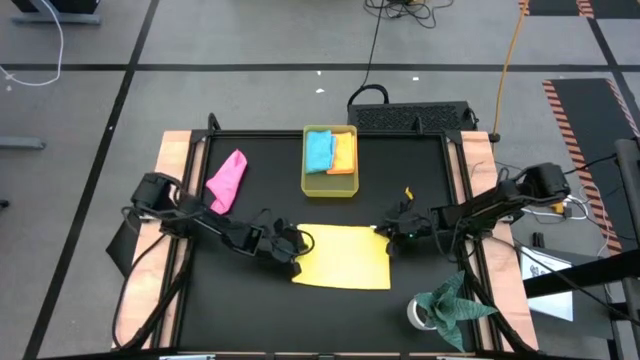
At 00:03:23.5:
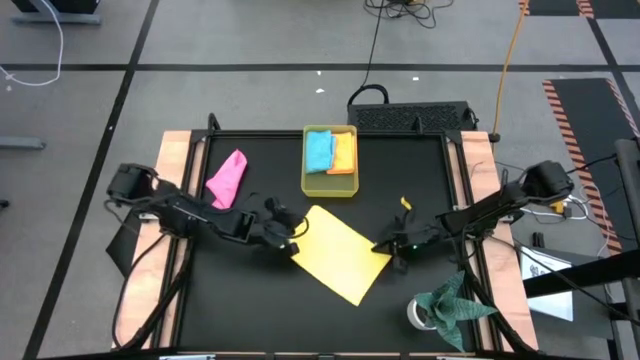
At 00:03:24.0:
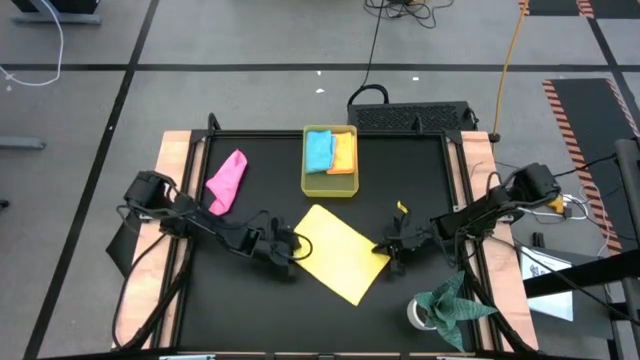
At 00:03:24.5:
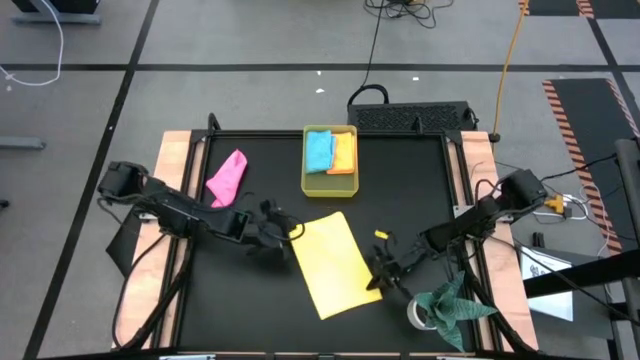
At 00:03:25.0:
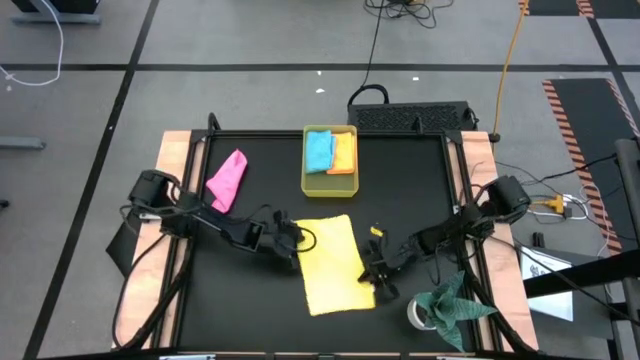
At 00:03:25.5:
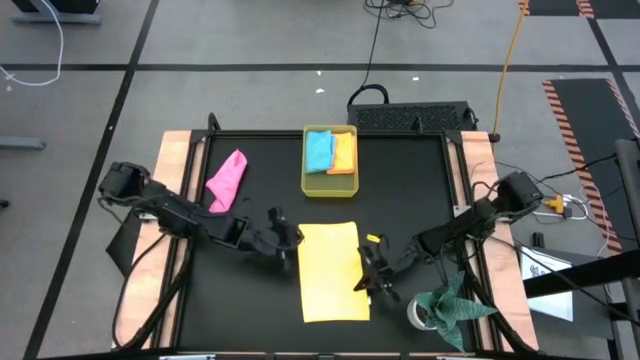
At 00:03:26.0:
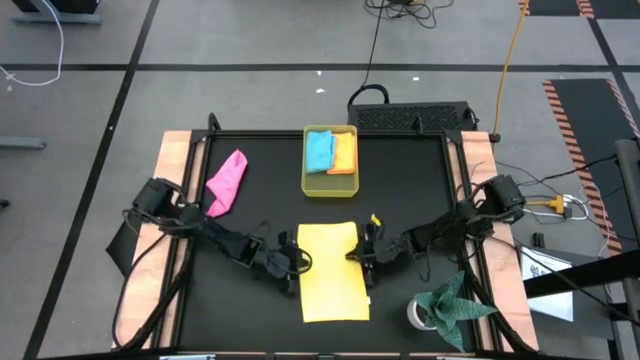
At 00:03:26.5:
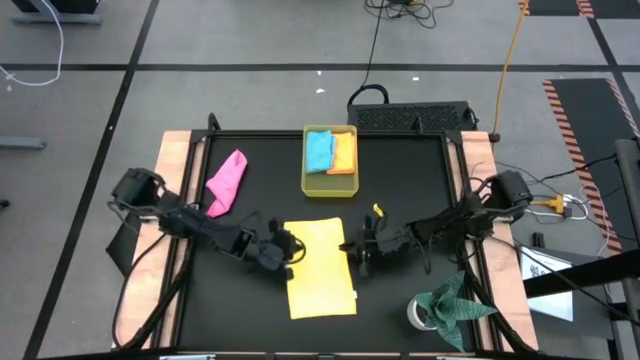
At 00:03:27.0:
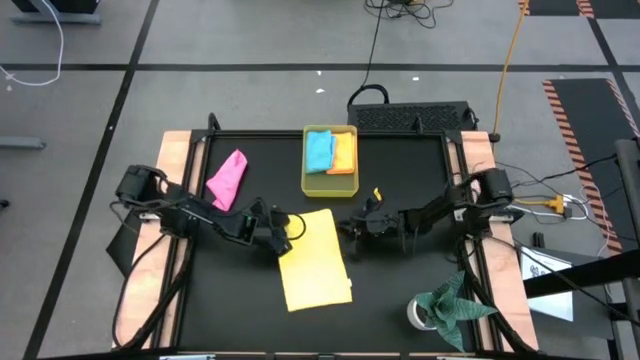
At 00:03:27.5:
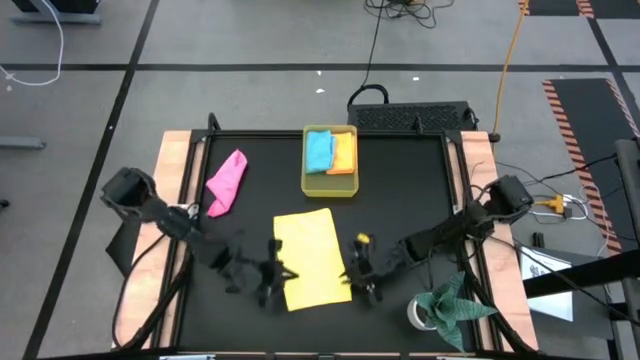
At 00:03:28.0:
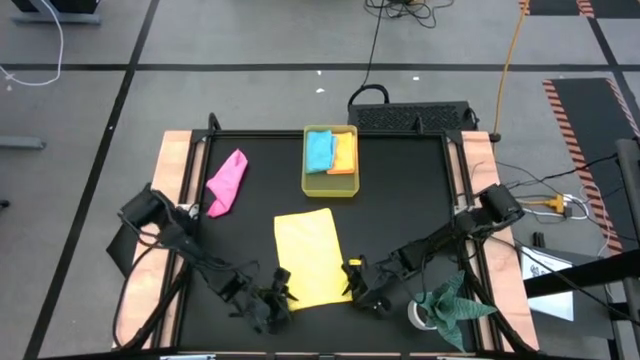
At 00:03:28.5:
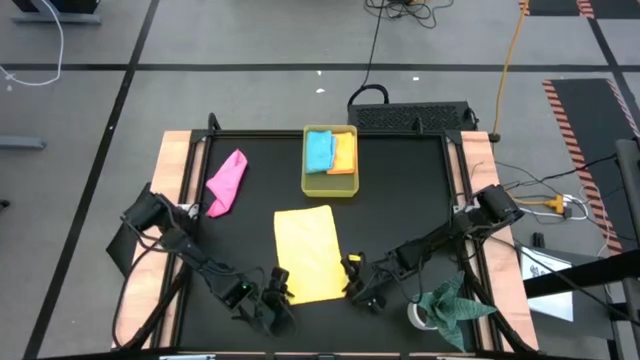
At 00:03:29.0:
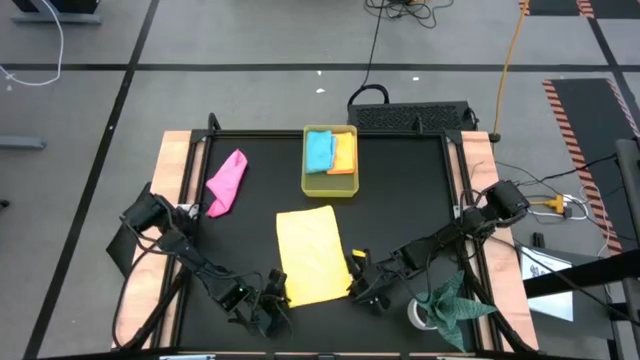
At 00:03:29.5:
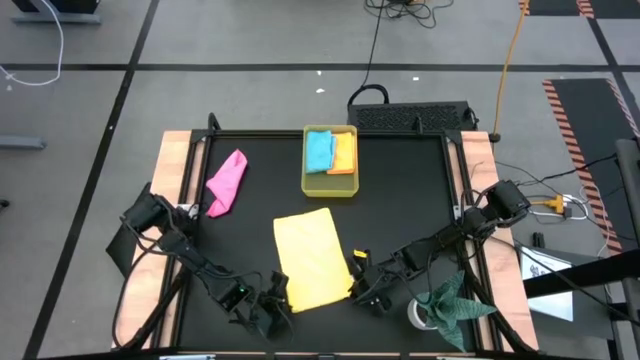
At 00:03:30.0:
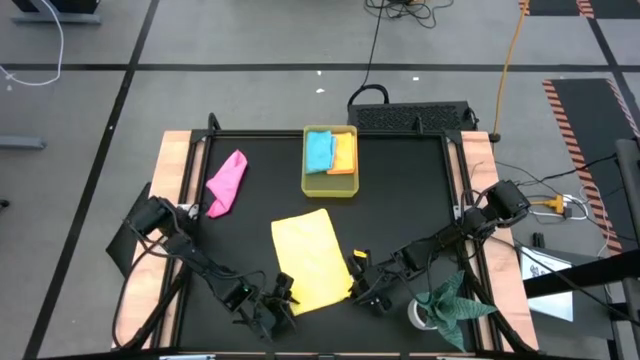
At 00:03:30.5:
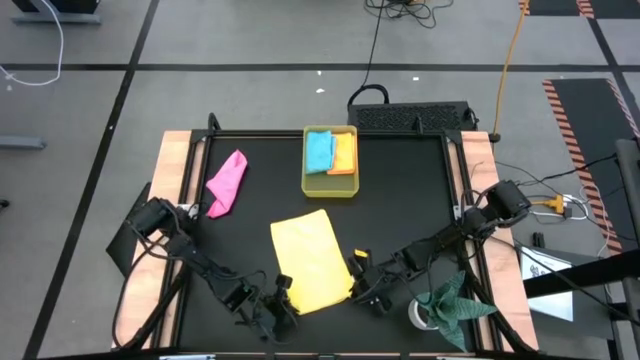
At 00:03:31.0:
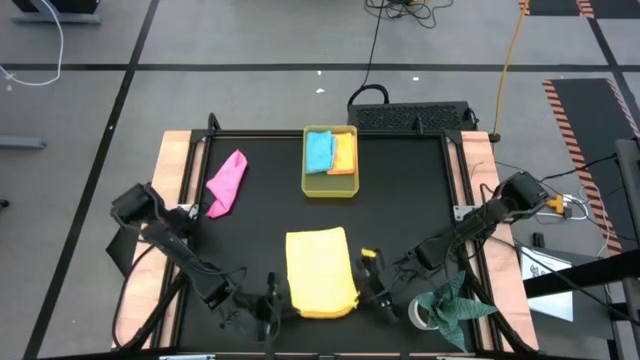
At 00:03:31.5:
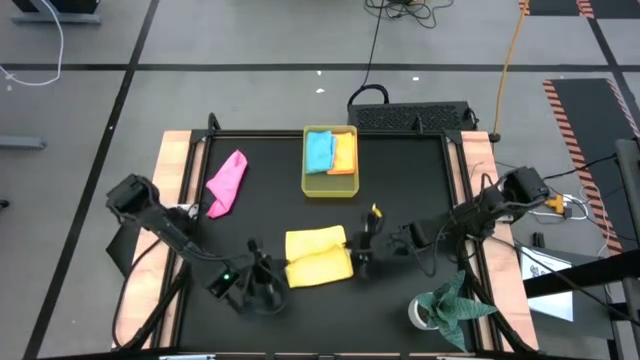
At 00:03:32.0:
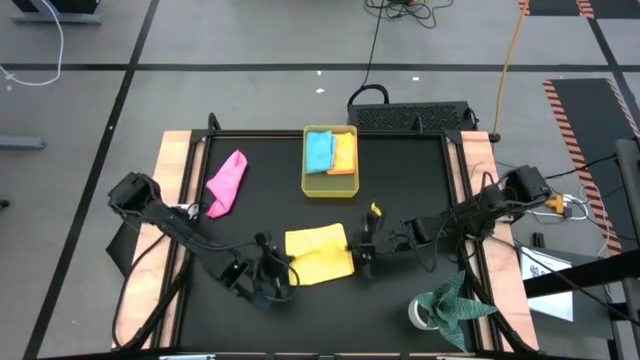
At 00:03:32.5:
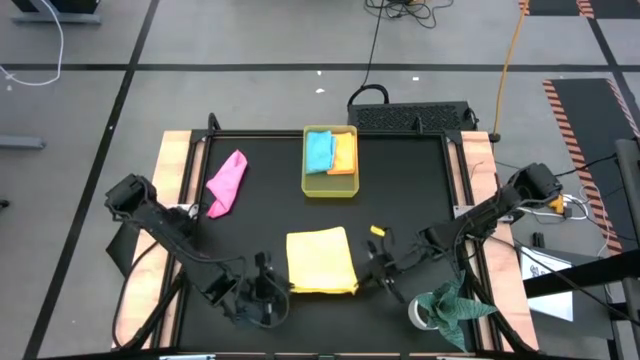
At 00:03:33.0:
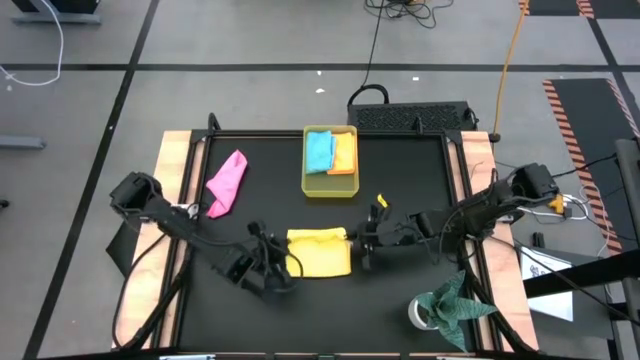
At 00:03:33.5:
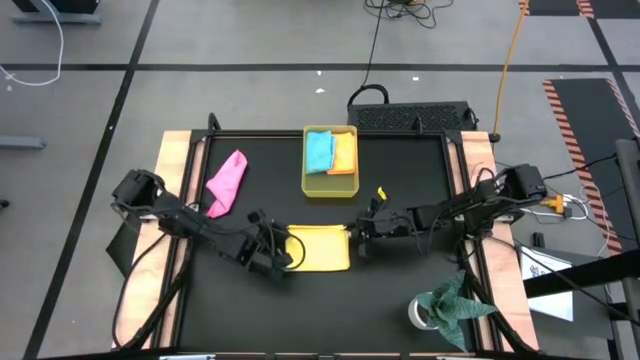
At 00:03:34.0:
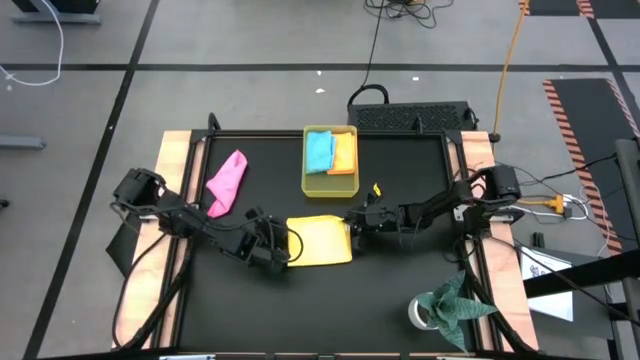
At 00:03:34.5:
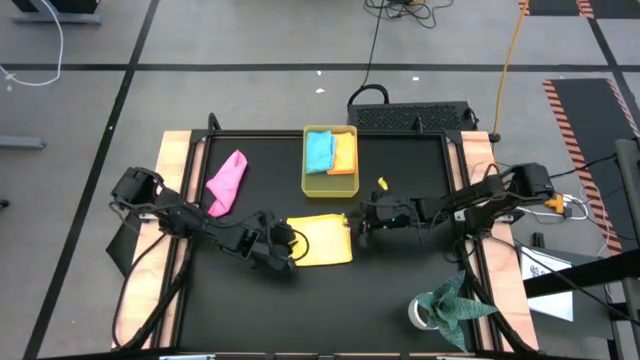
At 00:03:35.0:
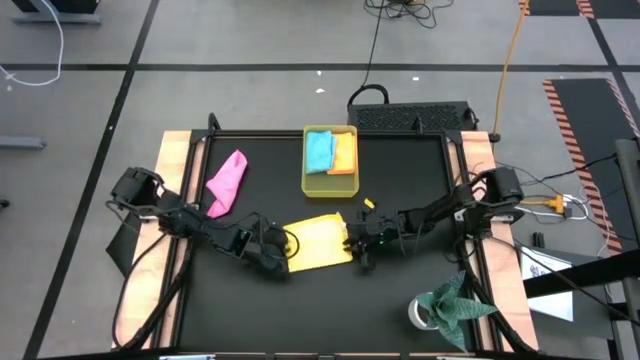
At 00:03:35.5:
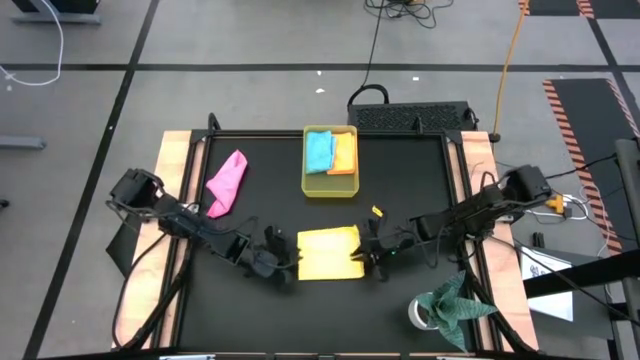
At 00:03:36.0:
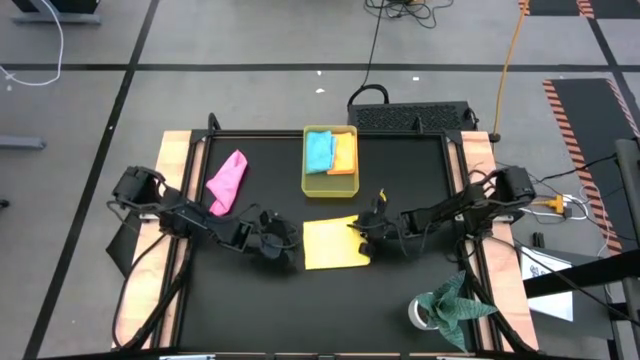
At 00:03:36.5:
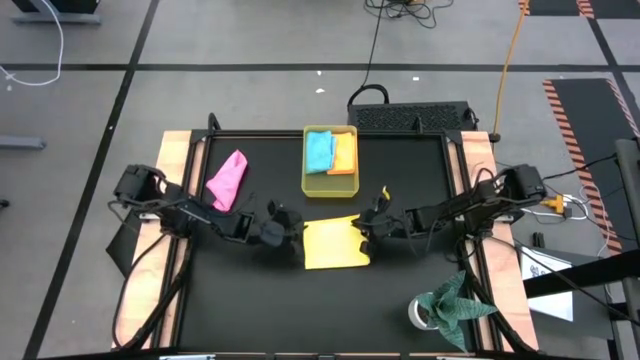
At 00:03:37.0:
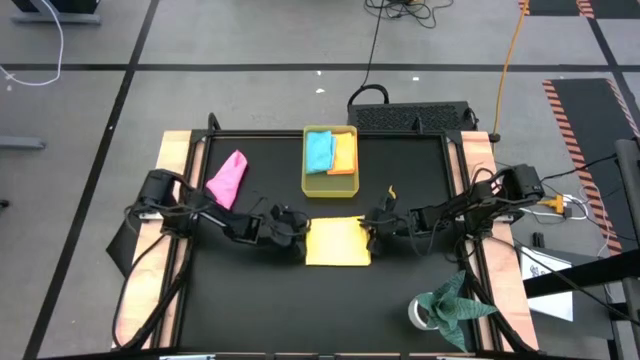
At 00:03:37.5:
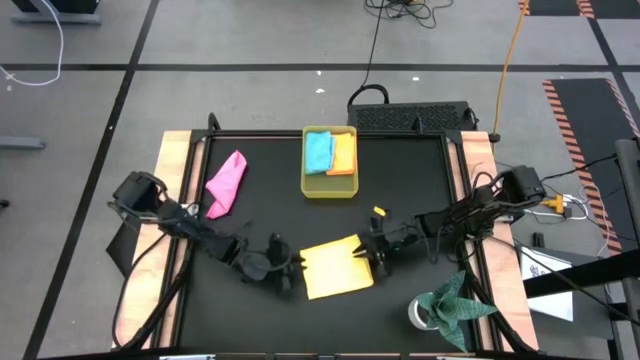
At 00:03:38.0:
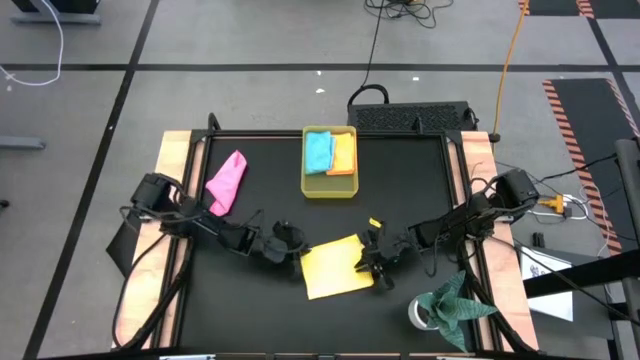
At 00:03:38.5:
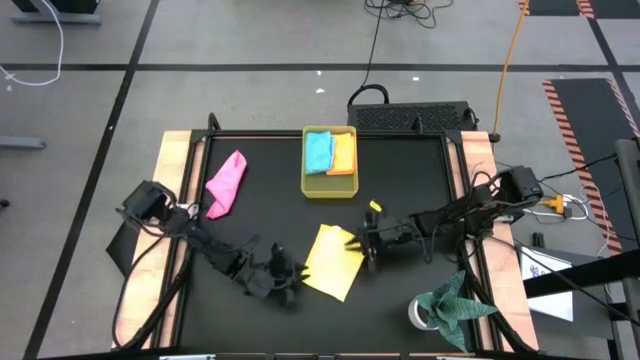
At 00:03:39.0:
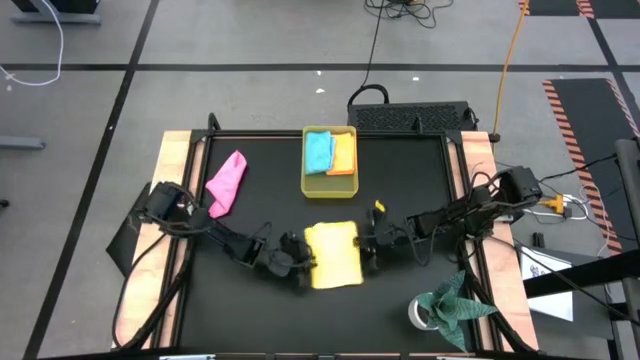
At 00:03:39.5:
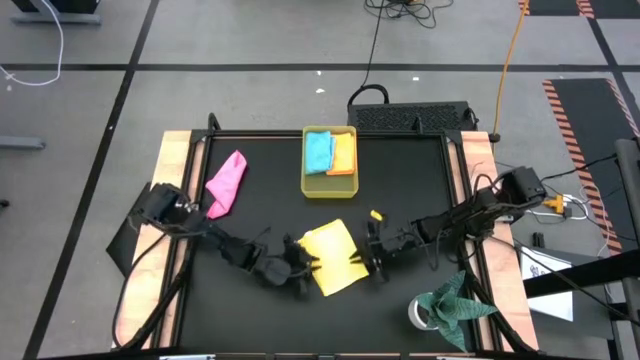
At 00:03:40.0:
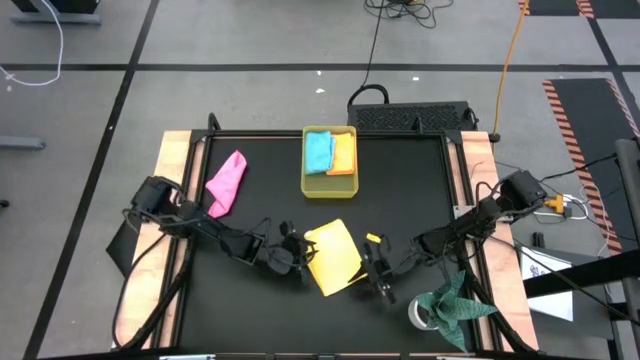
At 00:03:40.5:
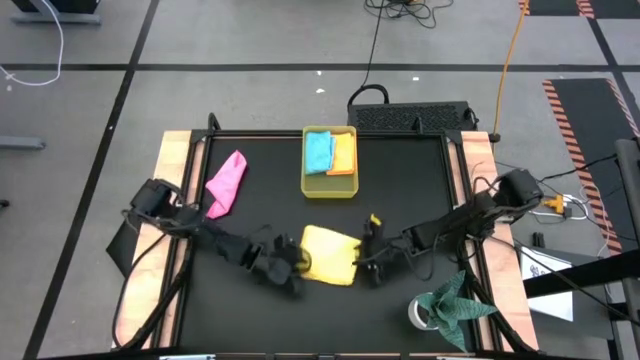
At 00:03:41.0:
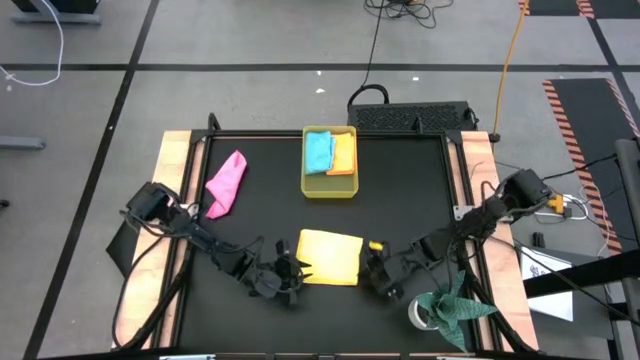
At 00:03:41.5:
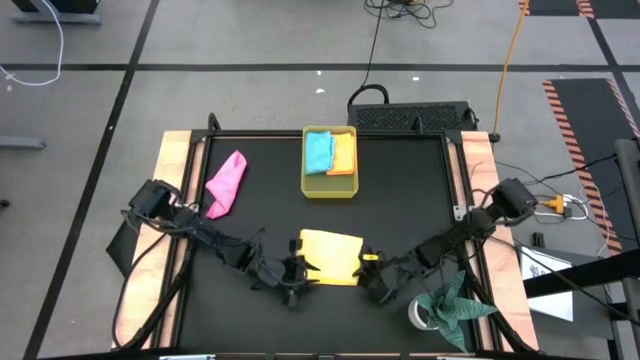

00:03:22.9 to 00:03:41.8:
Task: Fold microfiber towels
Fold the yellow towel
